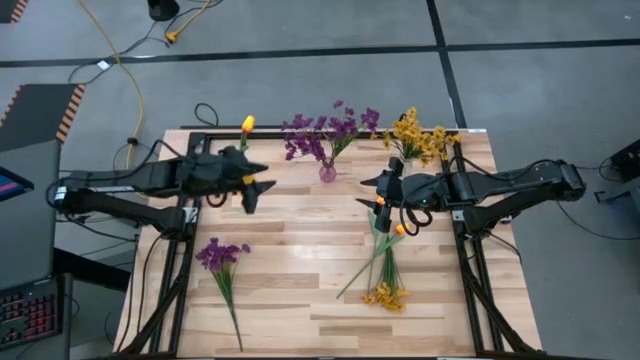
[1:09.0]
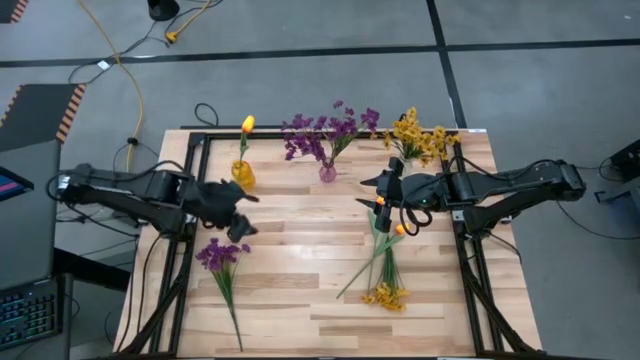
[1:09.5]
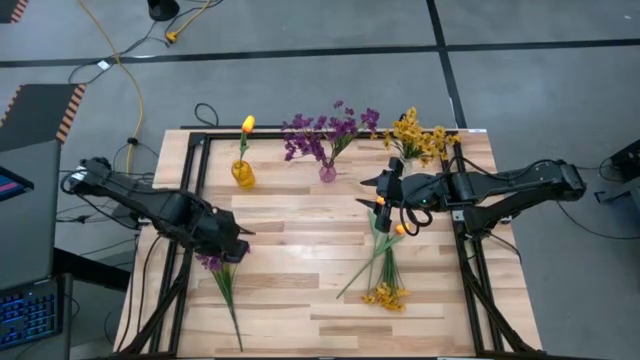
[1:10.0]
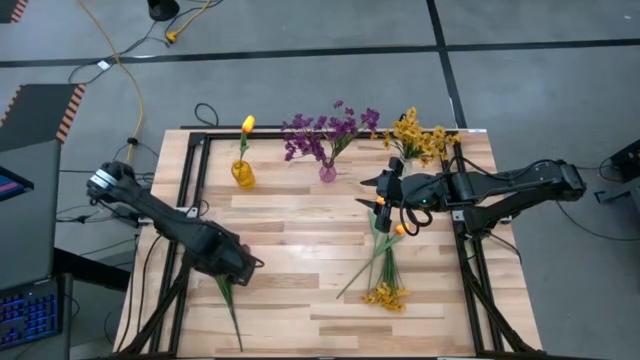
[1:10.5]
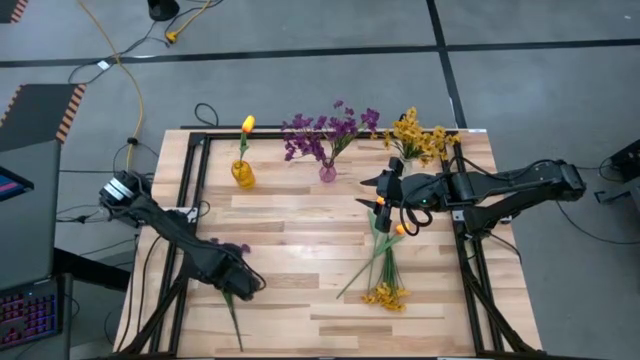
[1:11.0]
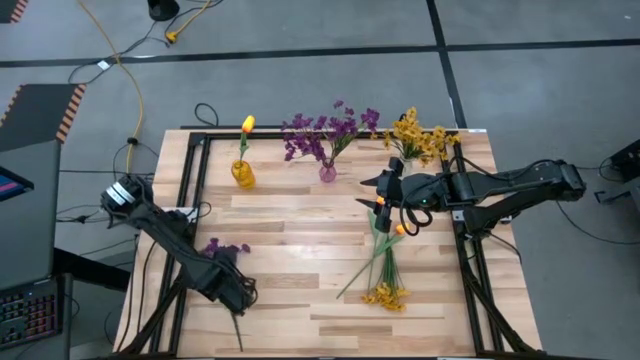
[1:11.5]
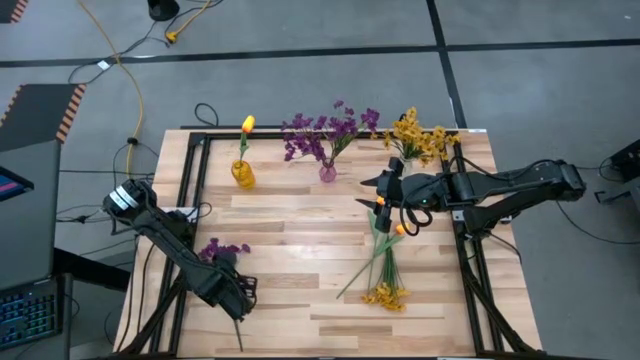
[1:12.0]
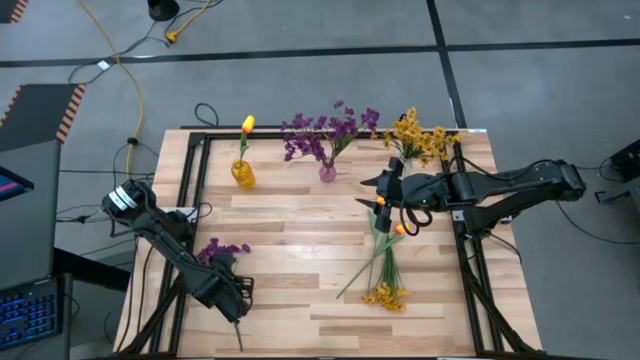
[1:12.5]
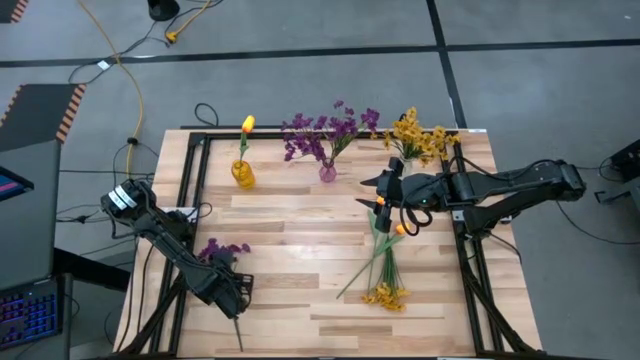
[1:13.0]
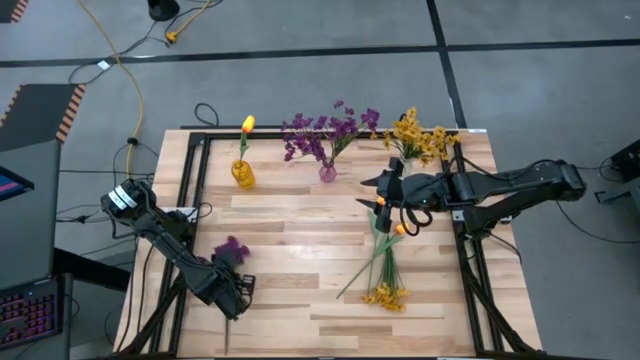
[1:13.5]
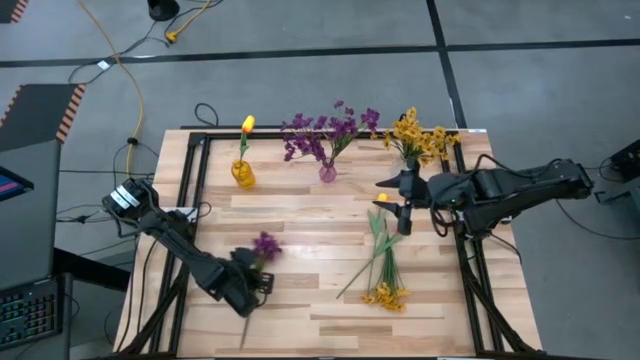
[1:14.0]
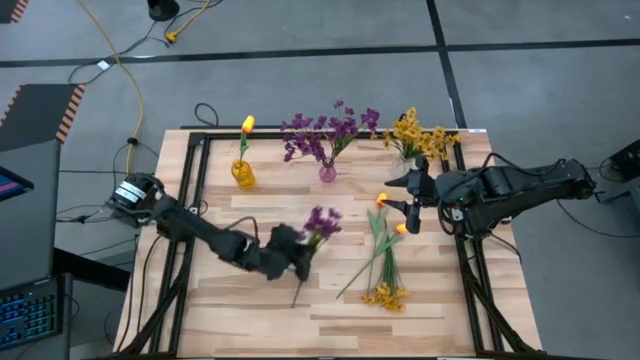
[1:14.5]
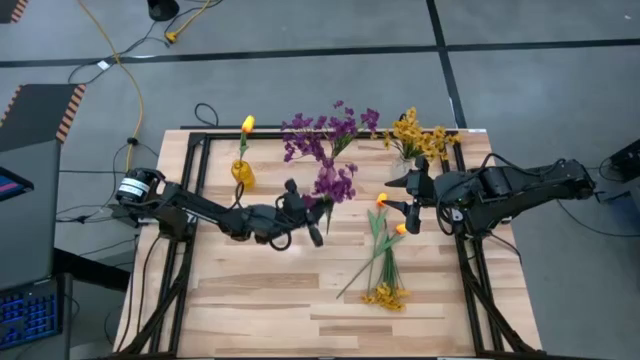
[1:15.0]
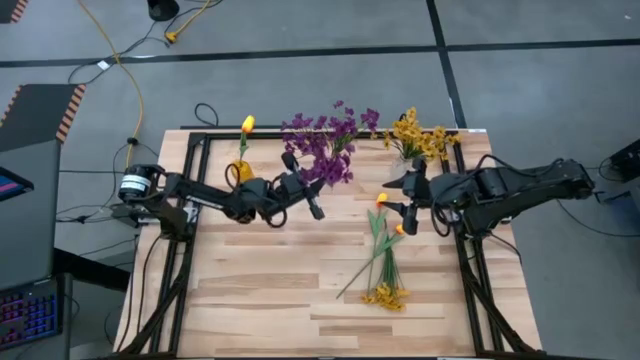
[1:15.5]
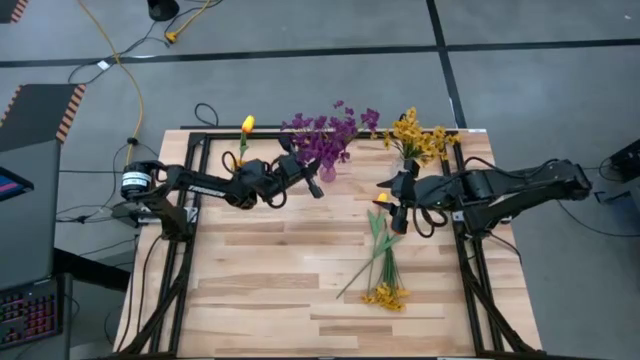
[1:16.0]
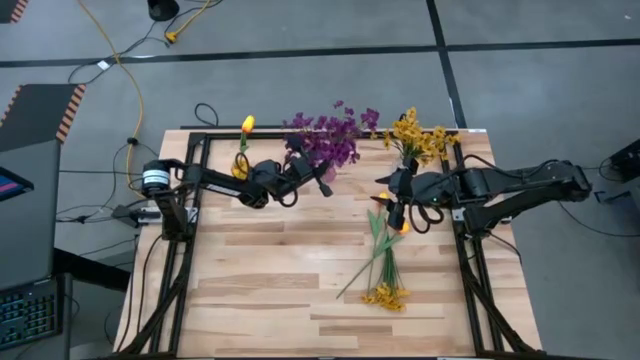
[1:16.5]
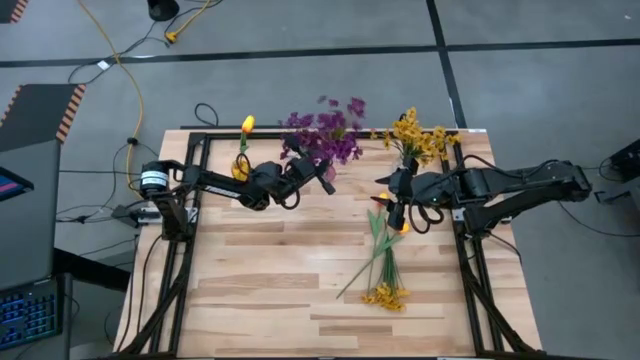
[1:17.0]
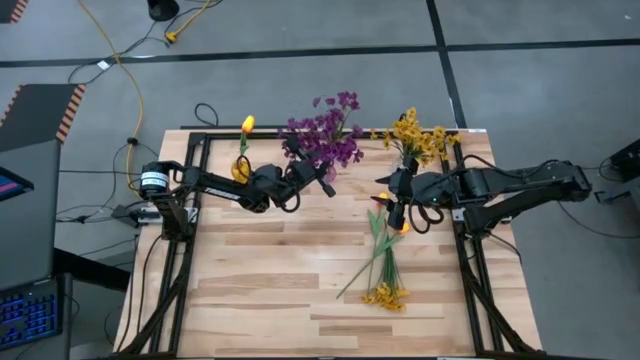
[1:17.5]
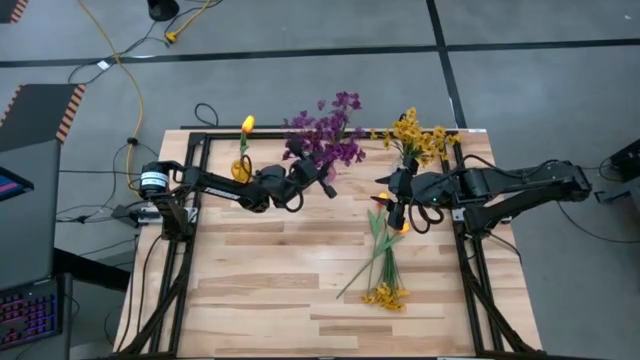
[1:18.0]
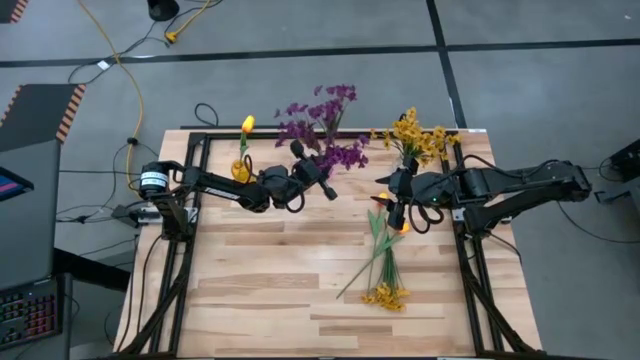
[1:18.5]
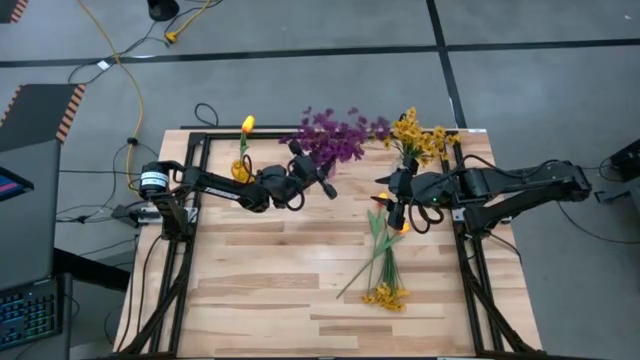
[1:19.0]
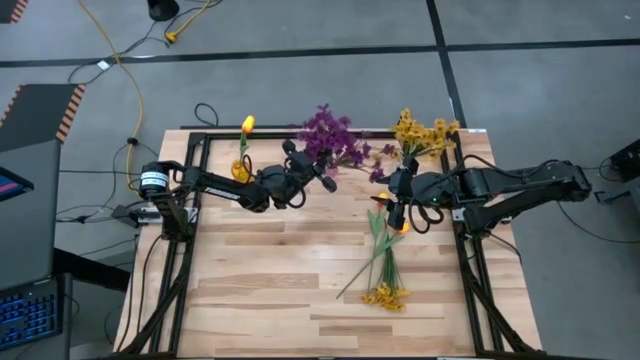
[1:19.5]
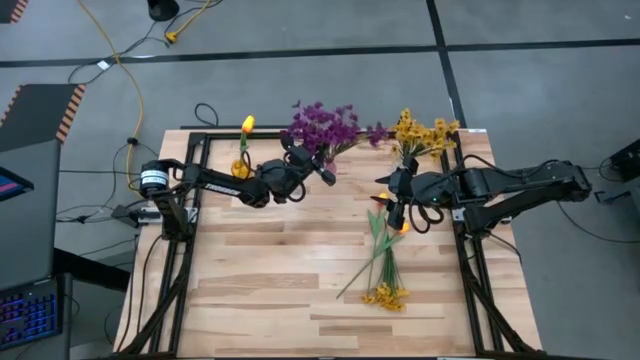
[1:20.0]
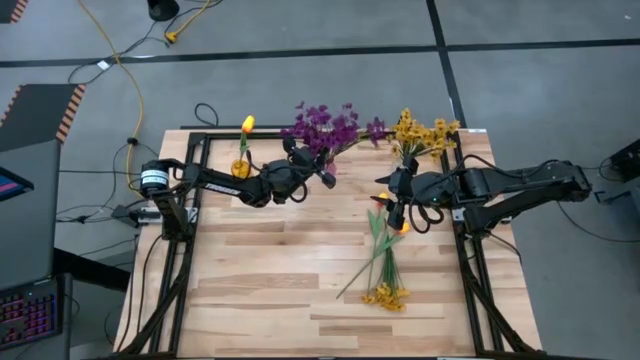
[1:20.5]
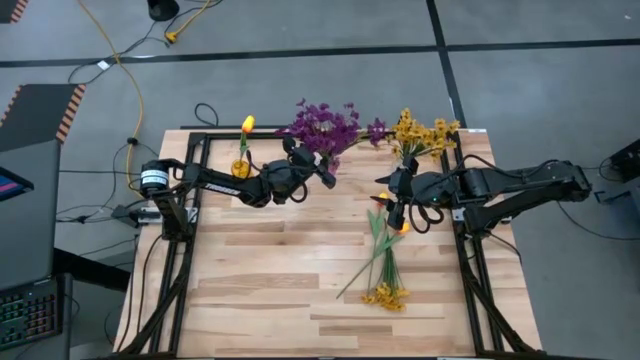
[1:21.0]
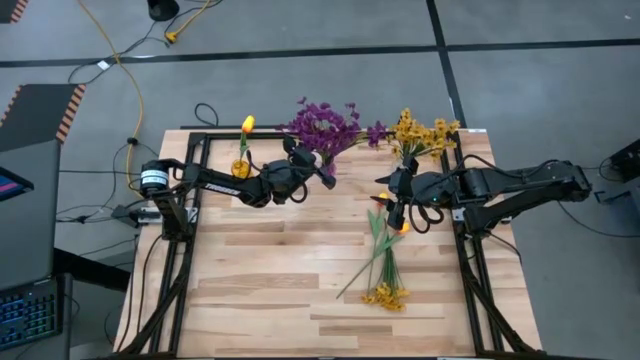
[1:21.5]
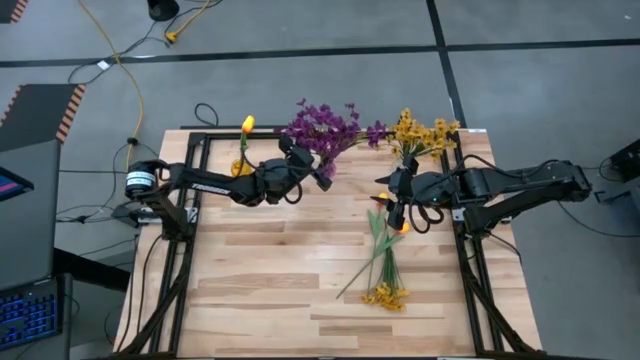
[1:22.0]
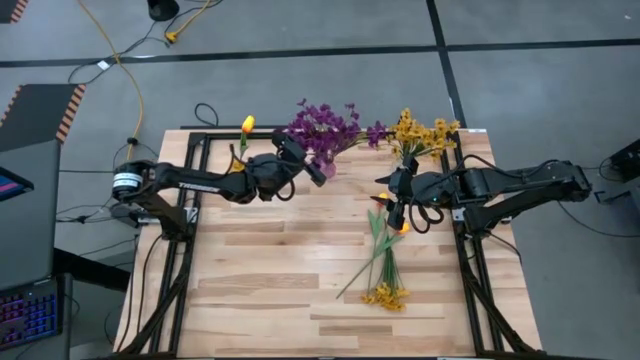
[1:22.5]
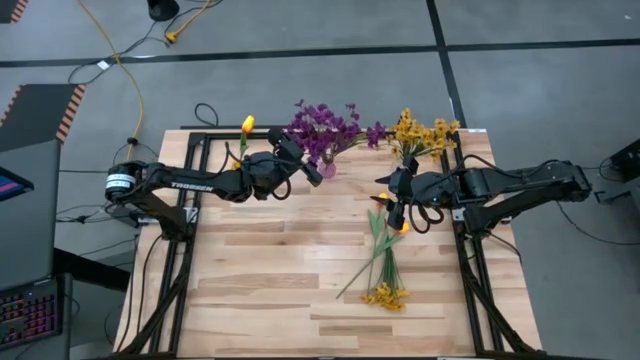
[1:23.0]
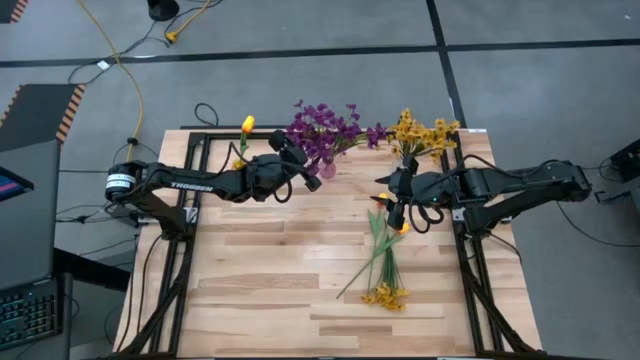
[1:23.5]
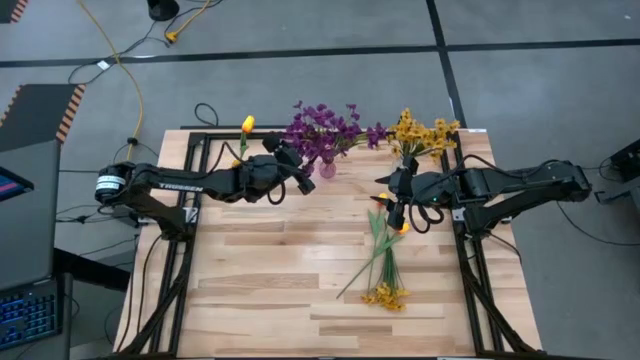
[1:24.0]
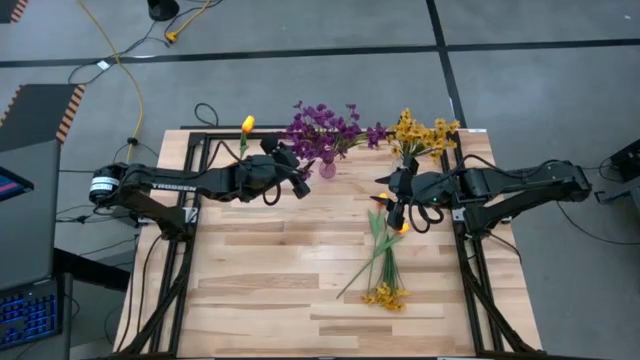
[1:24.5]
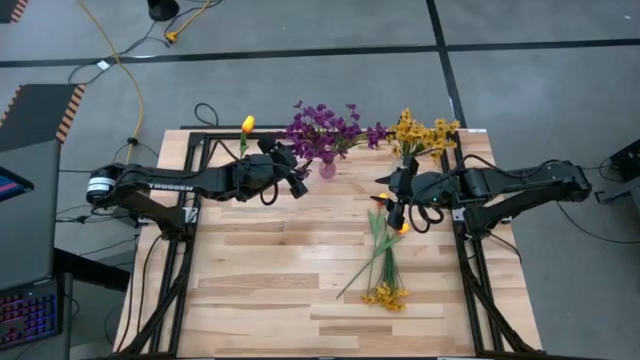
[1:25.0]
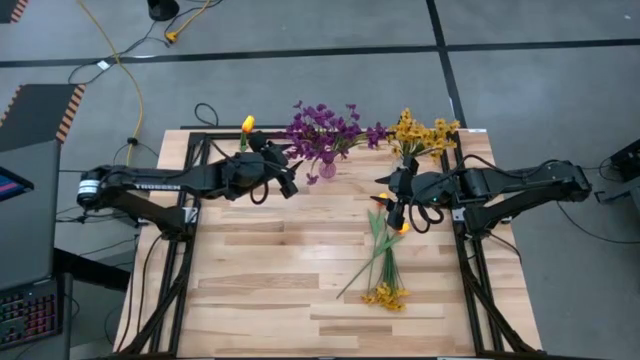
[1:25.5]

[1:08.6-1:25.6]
Task: Sort flowers into vase by color
Put the violet flowers into the violet vase

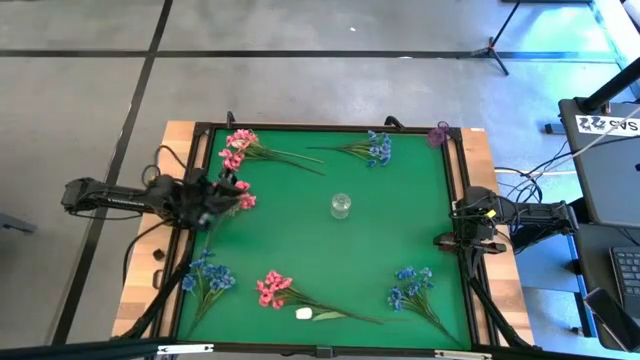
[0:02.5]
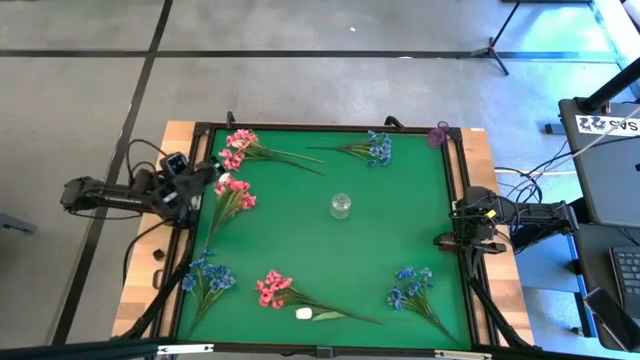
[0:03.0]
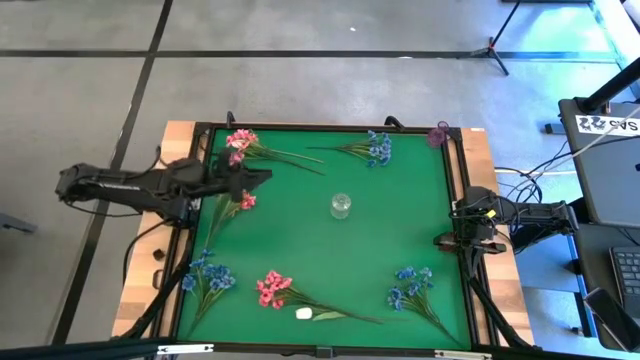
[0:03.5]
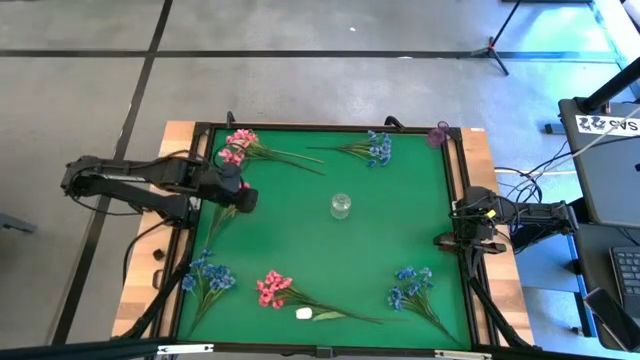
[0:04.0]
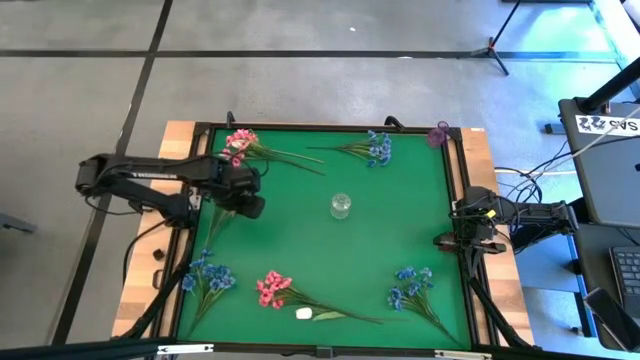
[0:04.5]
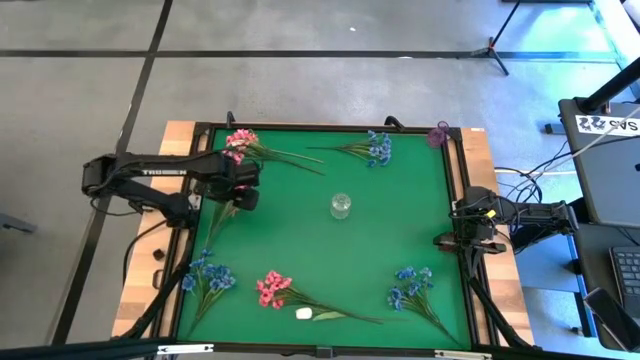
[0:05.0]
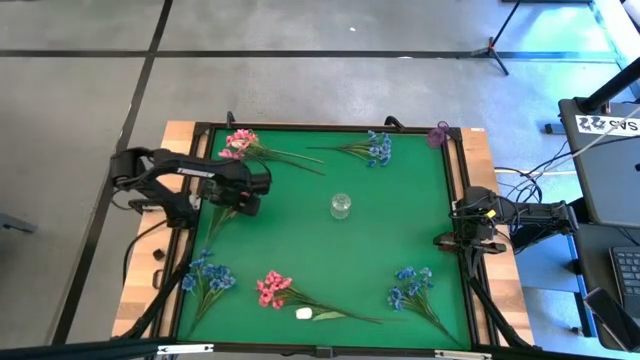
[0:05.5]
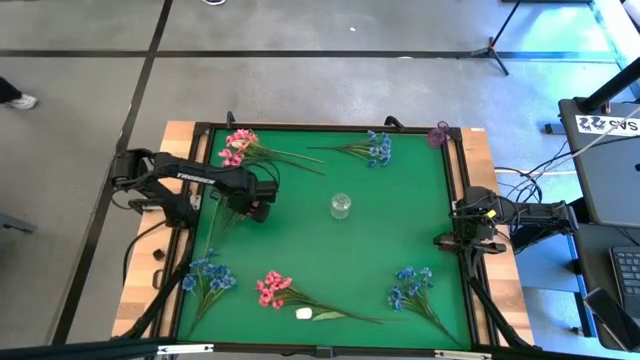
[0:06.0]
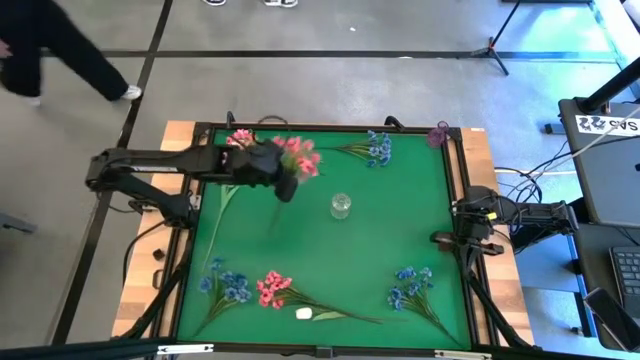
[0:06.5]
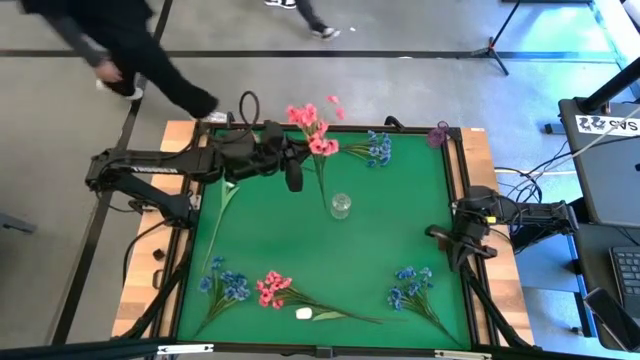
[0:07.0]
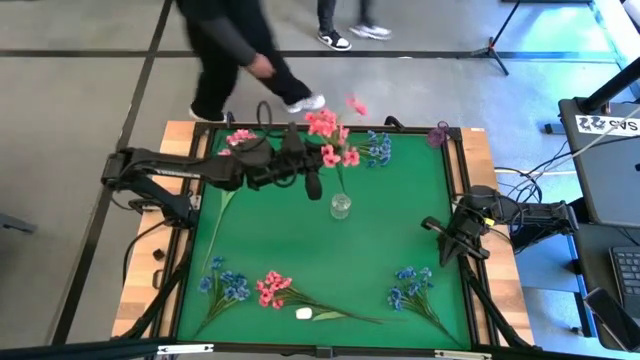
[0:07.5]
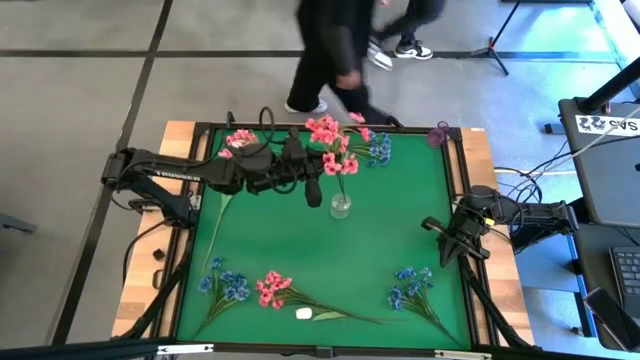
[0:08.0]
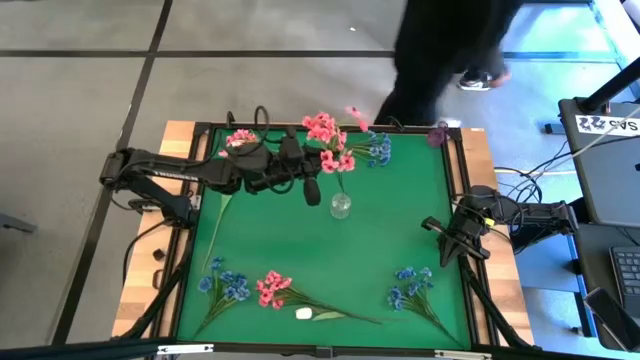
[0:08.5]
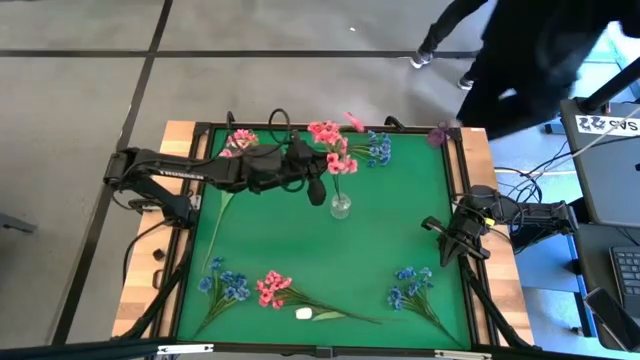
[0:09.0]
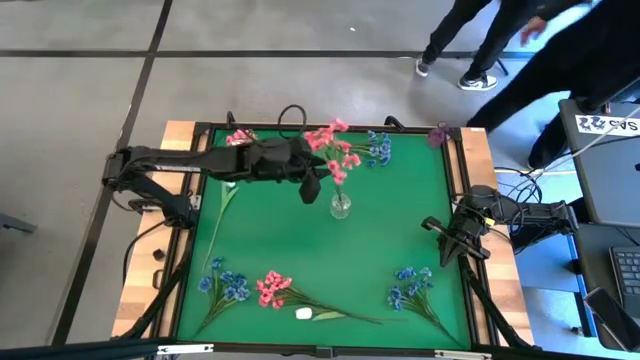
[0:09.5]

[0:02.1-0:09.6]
Task: Sort flowers into vase by color
Put the middle left pink flowers into the transparent vase
